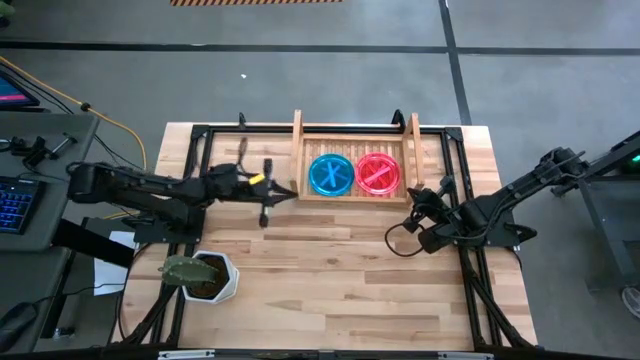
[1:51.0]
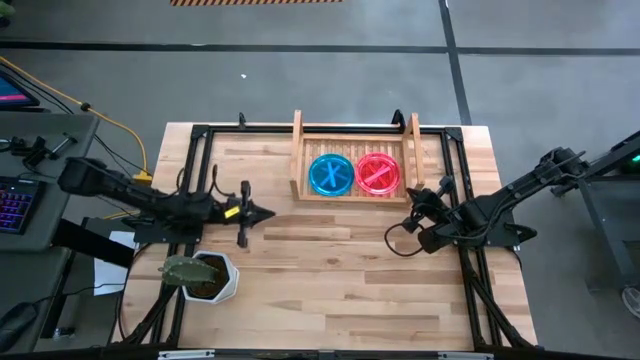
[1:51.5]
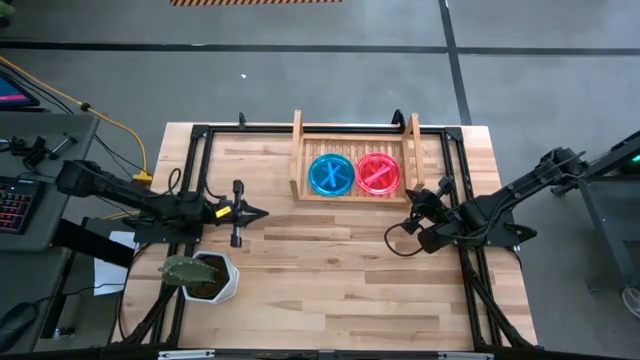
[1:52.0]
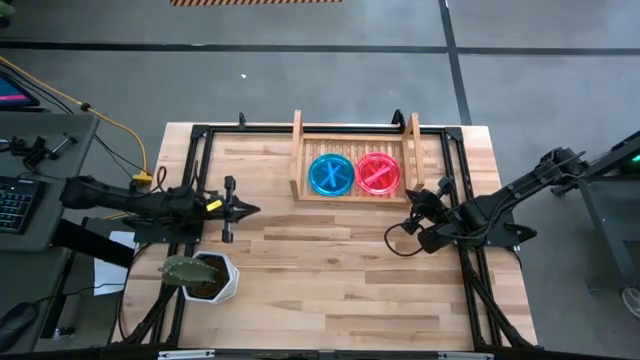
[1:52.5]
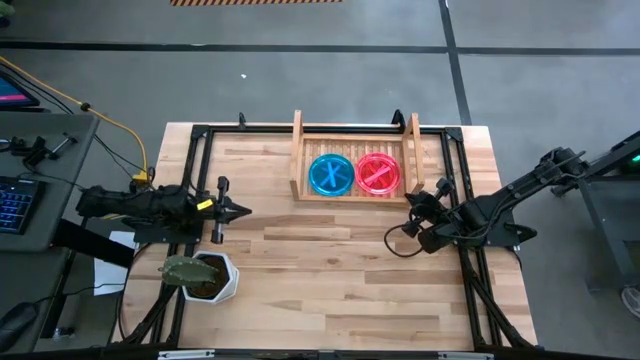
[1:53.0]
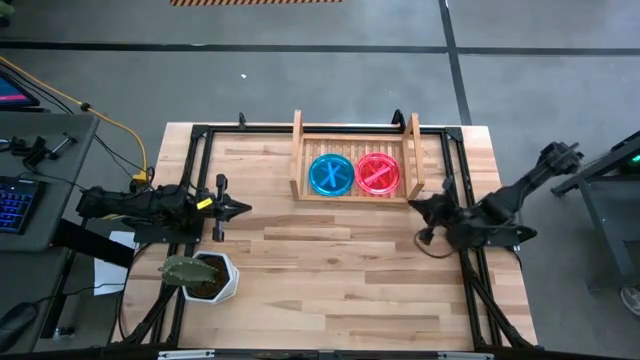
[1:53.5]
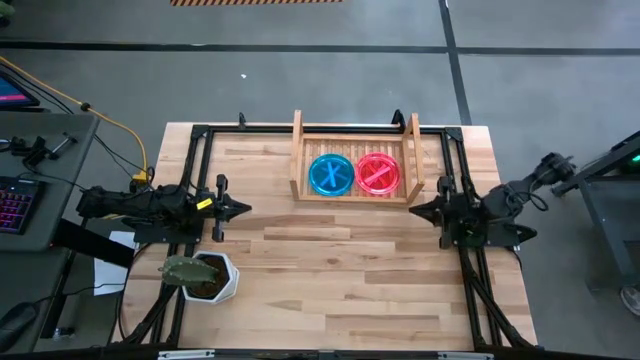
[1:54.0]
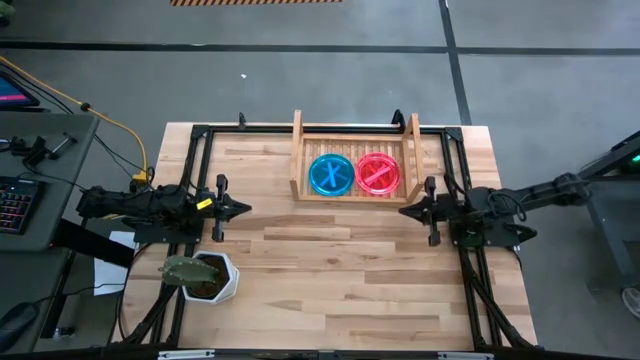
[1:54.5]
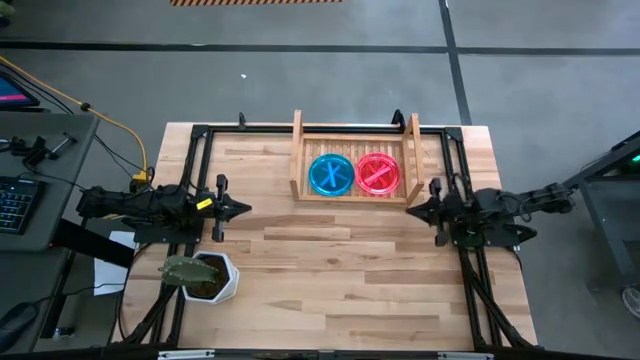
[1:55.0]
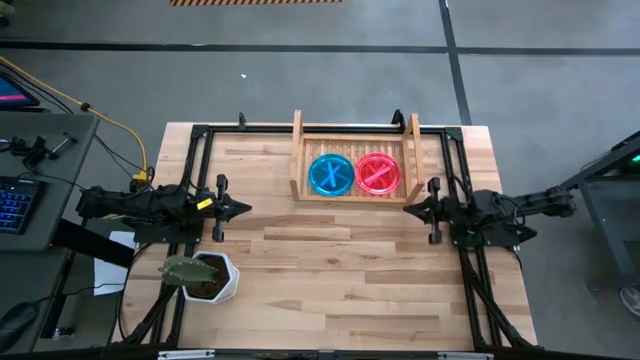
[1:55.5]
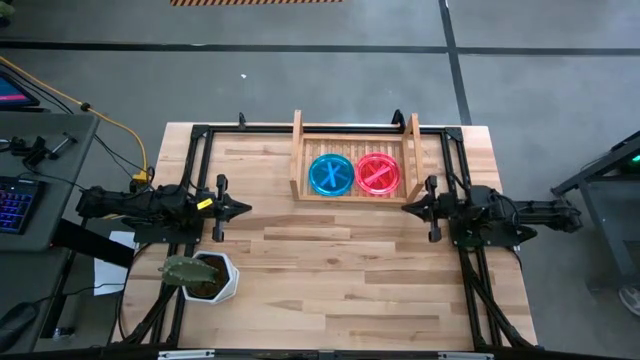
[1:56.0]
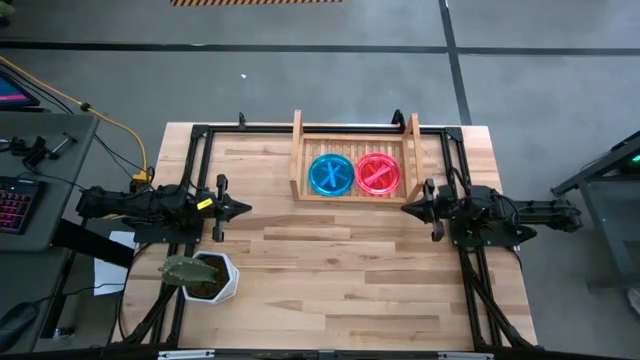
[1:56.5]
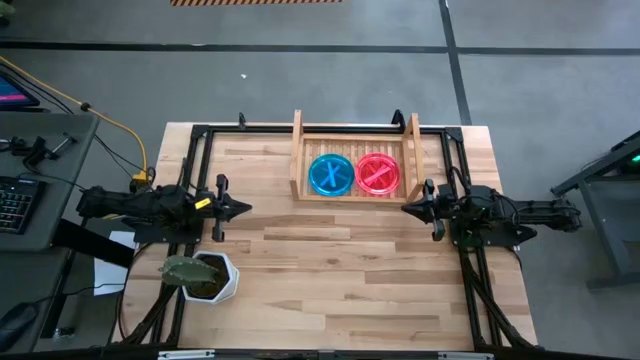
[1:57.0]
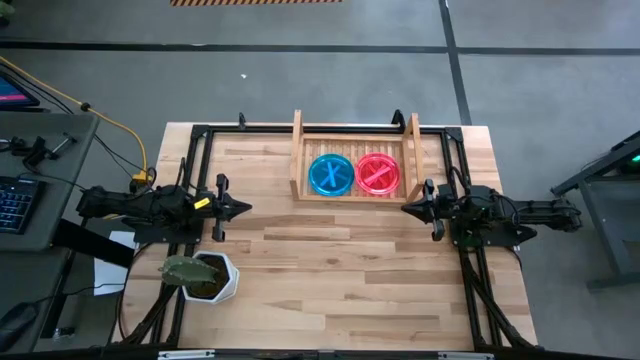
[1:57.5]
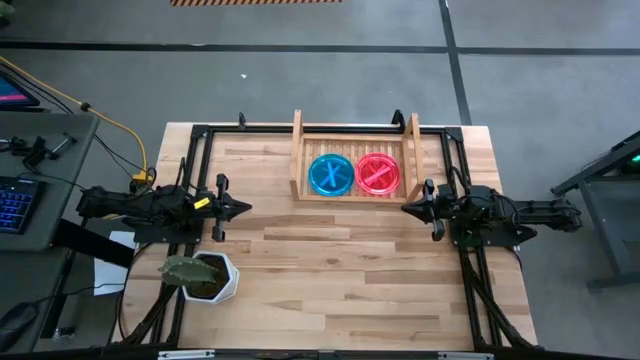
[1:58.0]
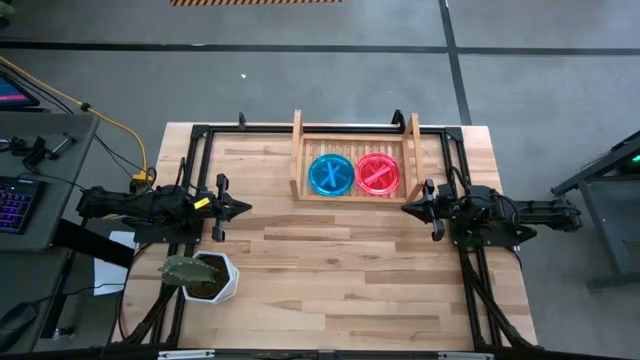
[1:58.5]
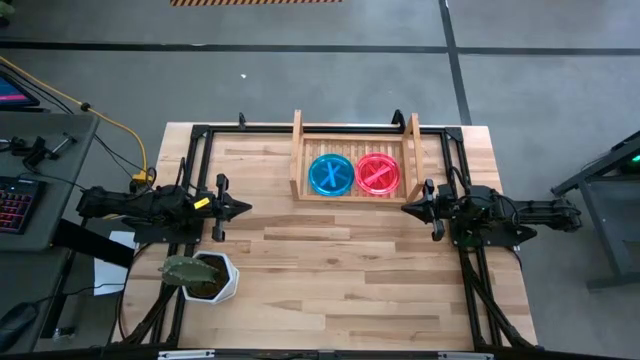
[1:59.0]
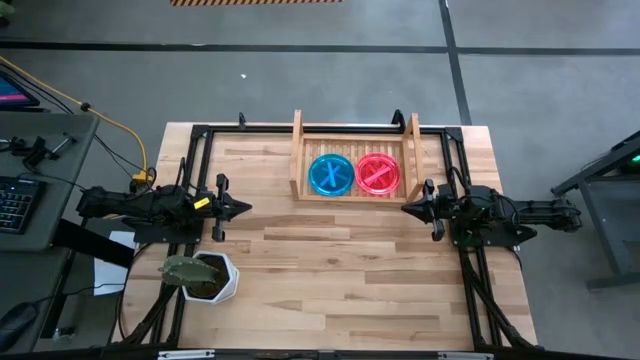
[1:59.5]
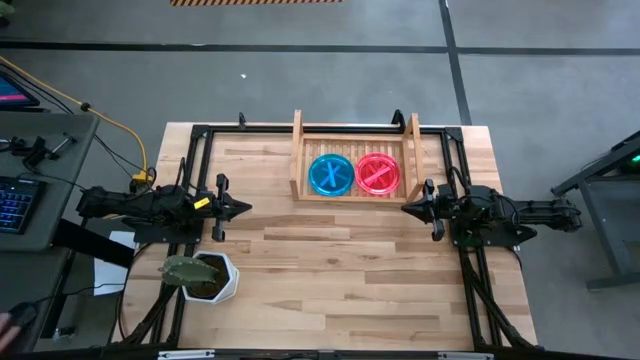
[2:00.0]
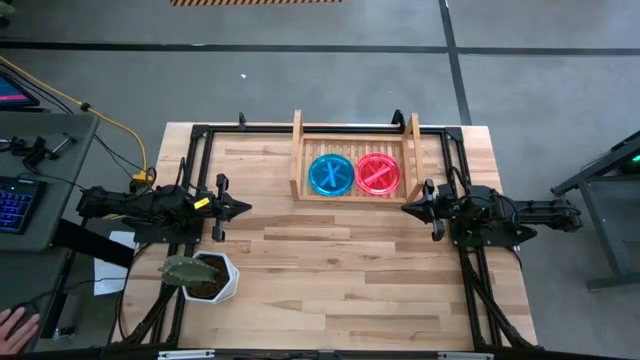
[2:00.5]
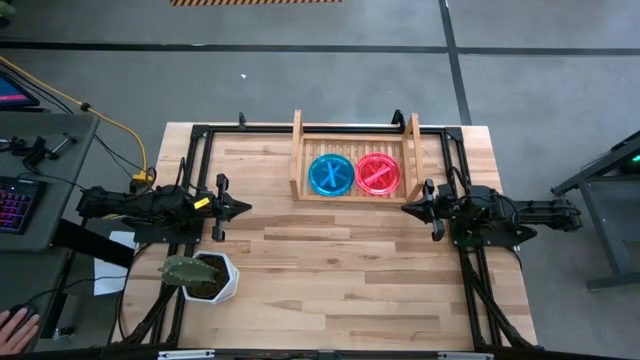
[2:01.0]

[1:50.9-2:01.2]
Task: Place and stack plates onto a shelf
Return to Home Position

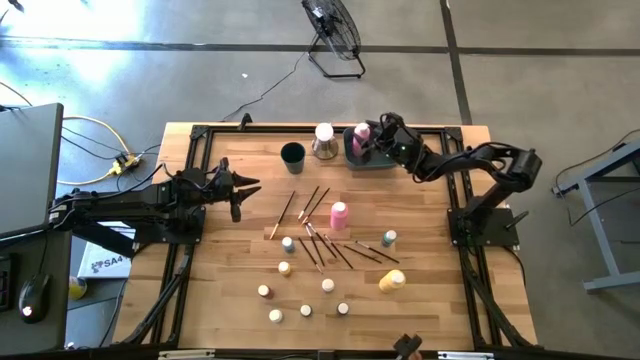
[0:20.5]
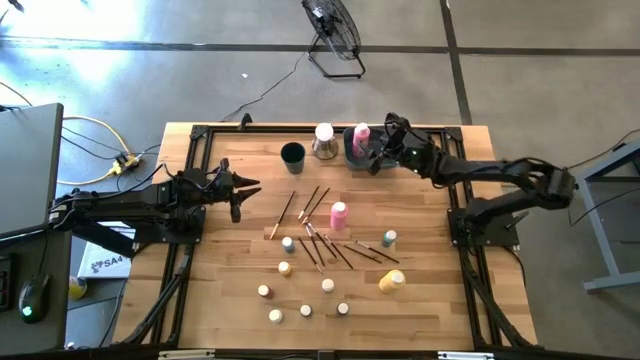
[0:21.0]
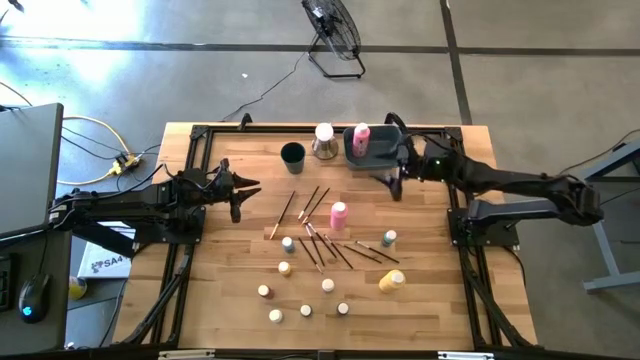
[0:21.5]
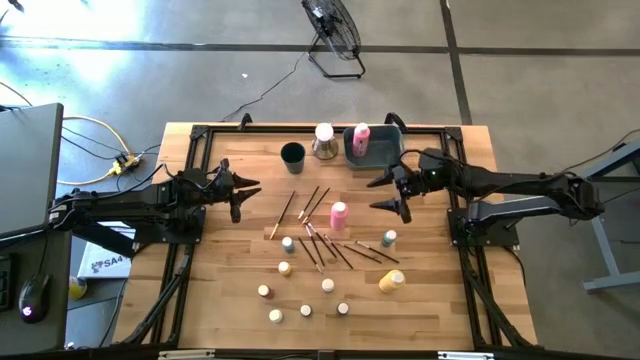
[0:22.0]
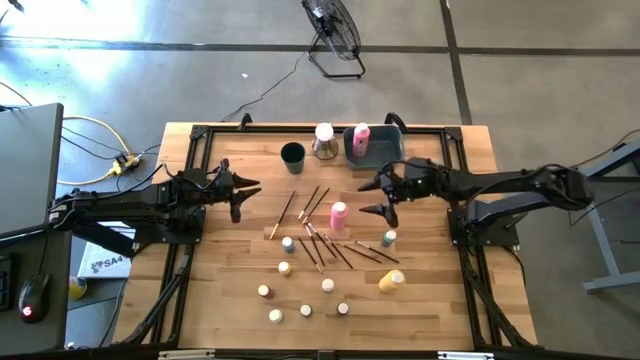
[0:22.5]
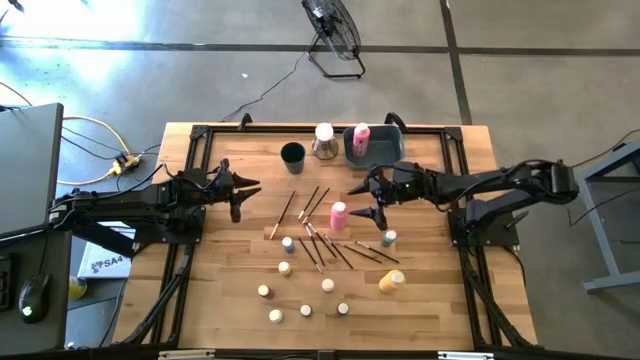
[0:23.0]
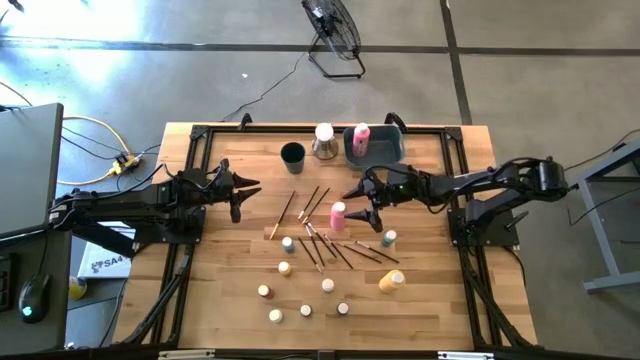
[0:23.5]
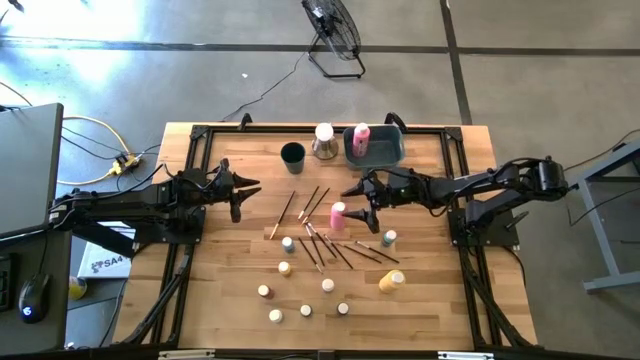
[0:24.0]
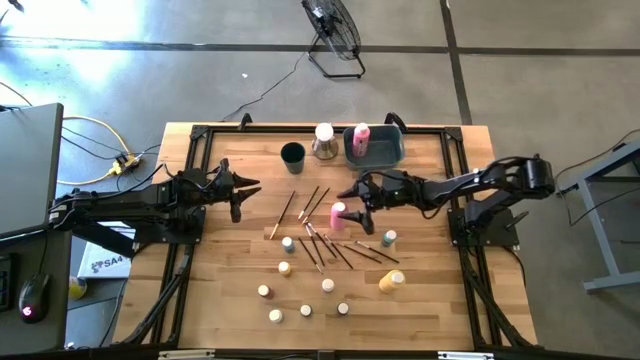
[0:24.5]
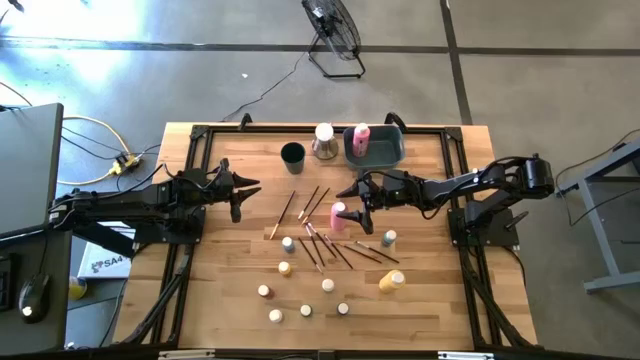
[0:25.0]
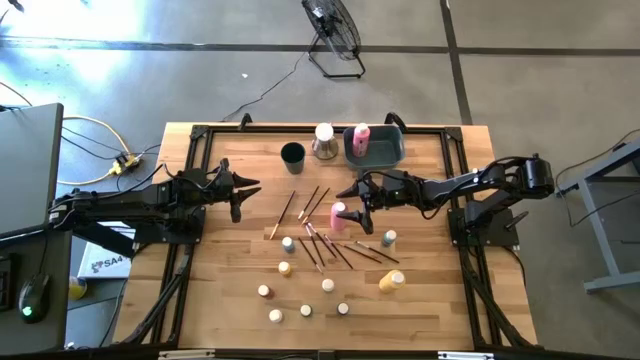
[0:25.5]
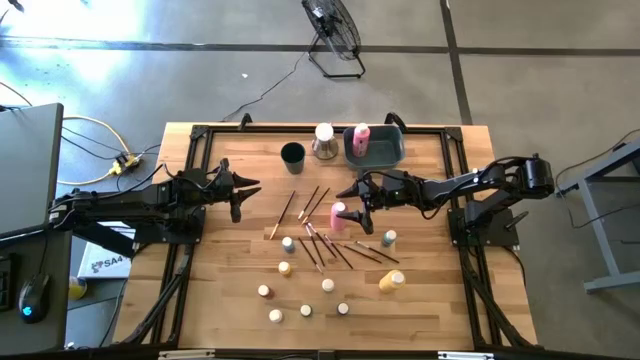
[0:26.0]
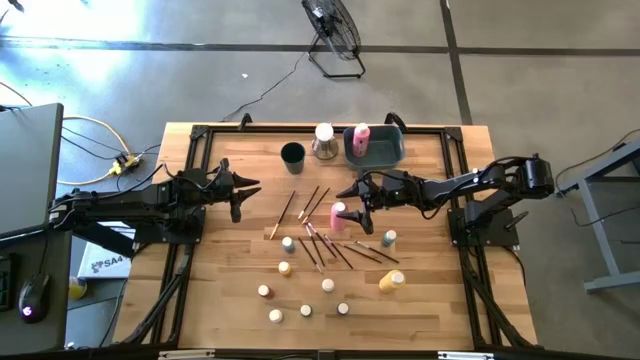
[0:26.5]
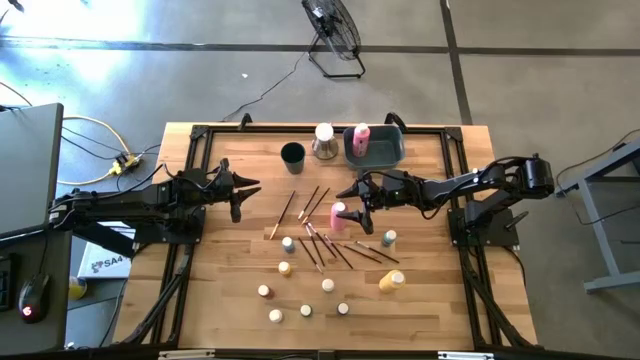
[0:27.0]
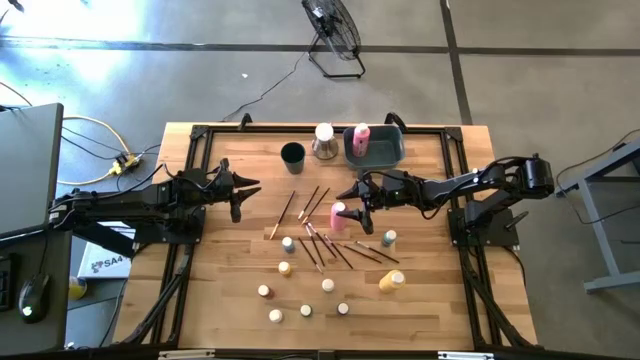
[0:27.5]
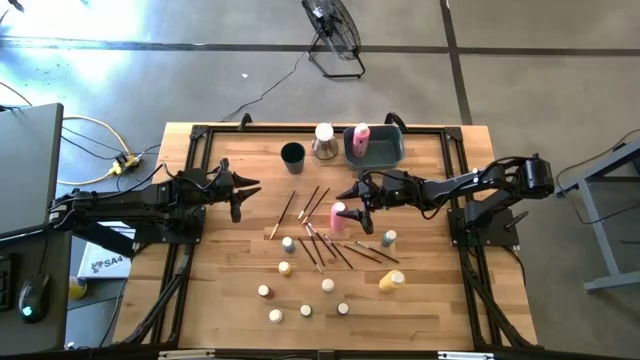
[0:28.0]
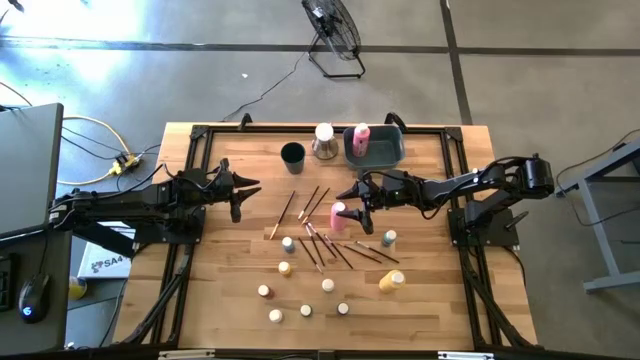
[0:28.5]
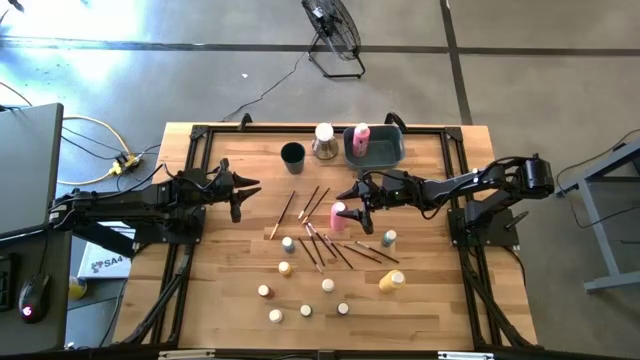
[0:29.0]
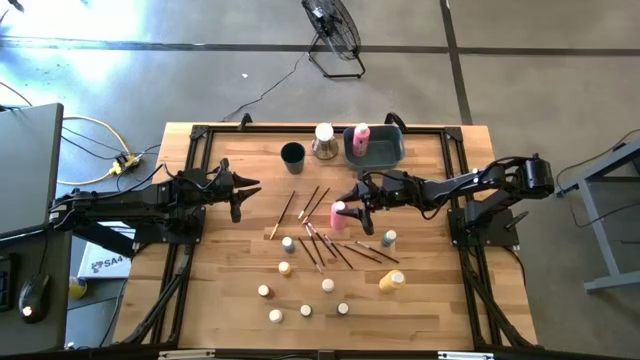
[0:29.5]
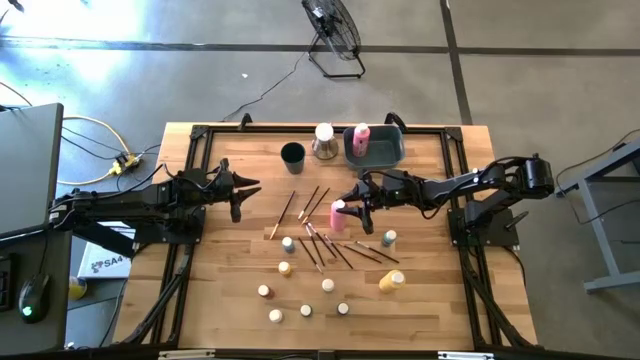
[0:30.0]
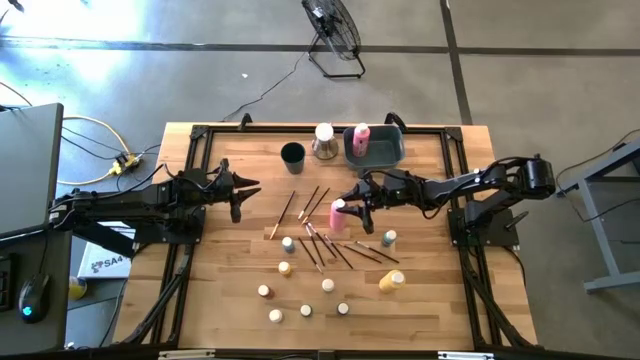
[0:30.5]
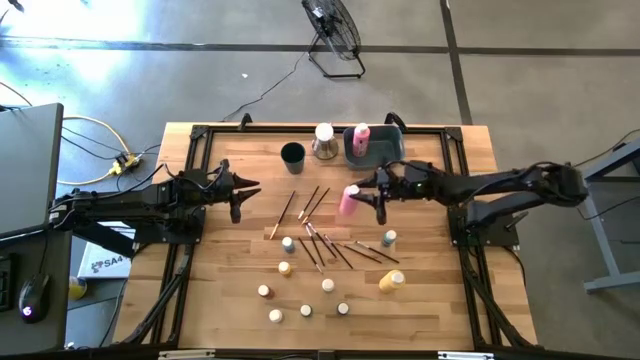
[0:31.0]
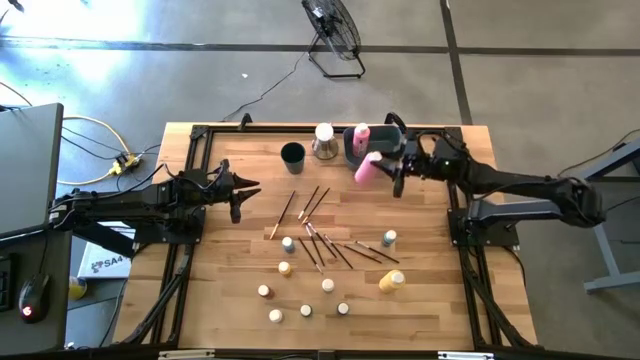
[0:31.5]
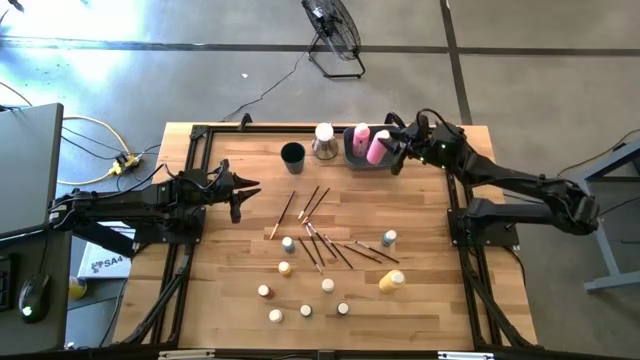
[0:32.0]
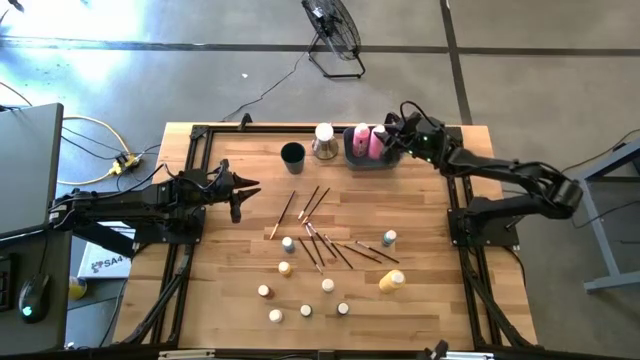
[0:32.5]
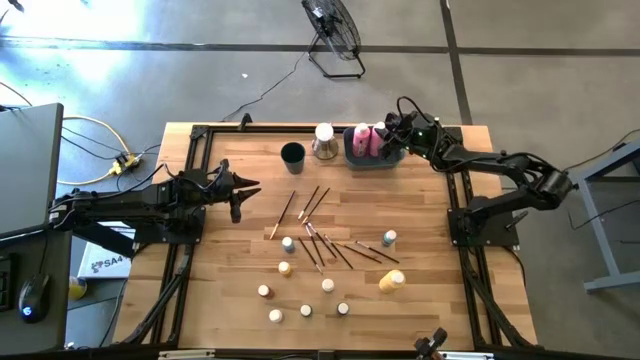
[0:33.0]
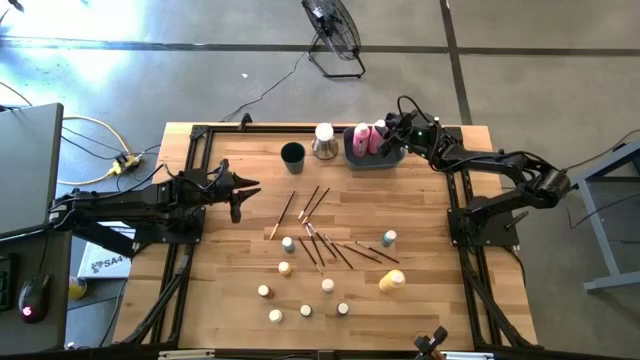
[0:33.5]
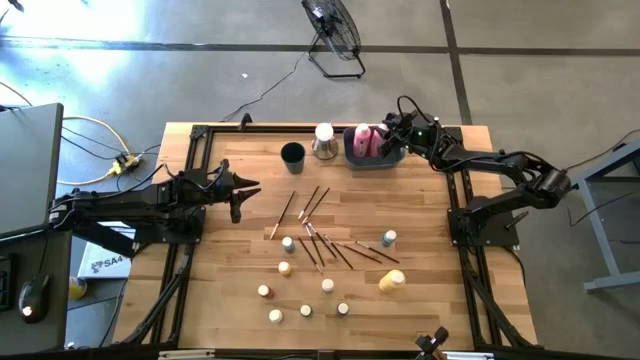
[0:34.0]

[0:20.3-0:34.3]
Task: Pick & Place Paint Supplies
Put the large pink paint bottle into the blue bin
